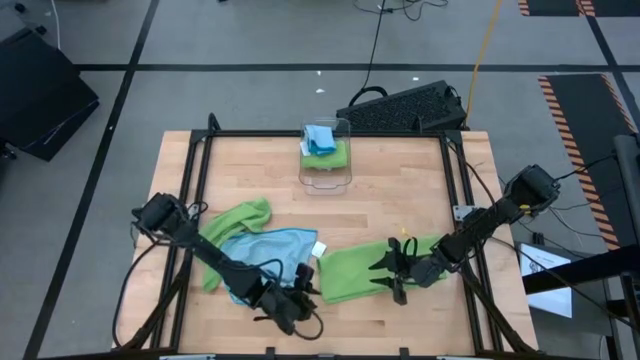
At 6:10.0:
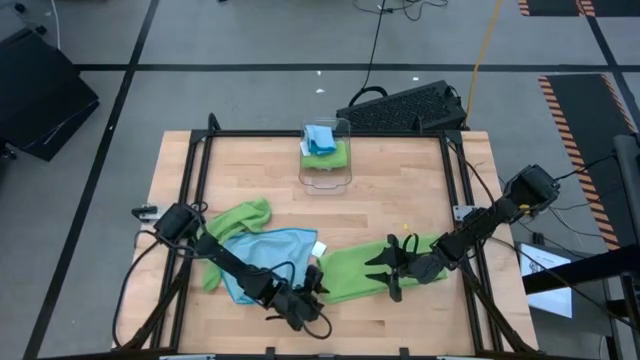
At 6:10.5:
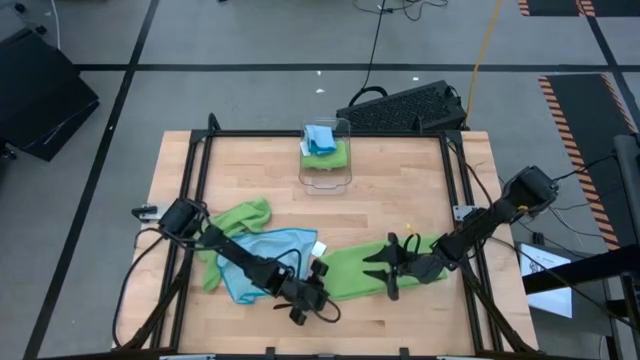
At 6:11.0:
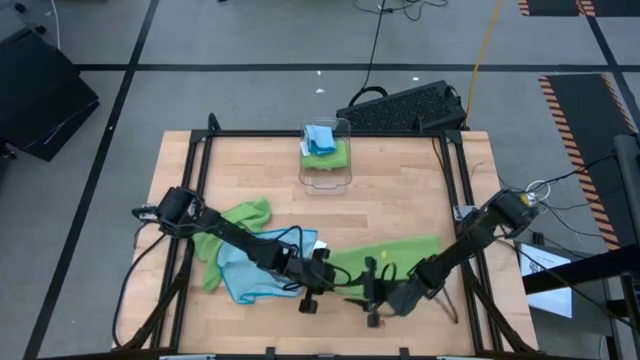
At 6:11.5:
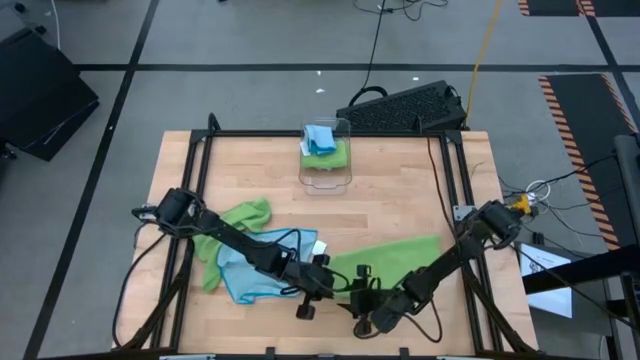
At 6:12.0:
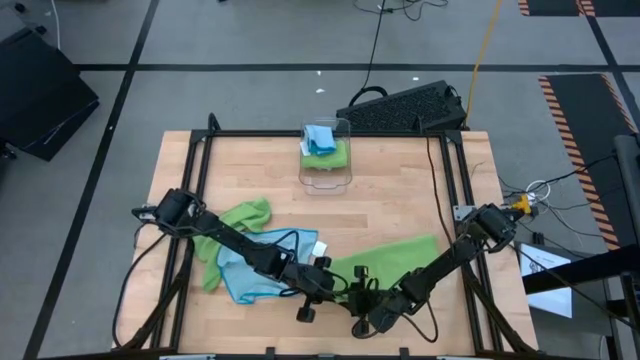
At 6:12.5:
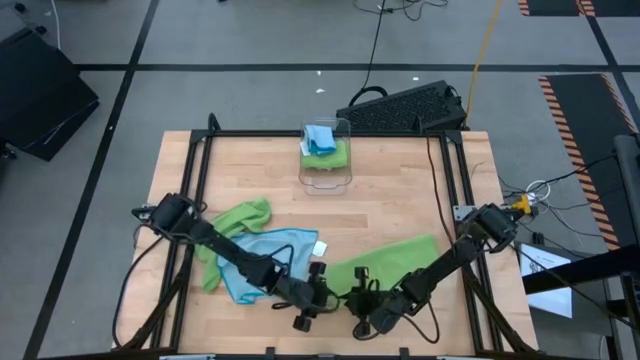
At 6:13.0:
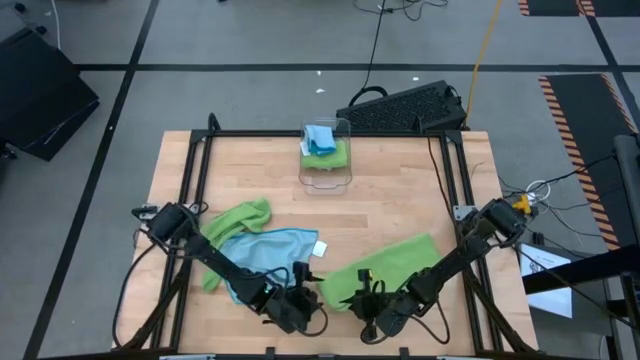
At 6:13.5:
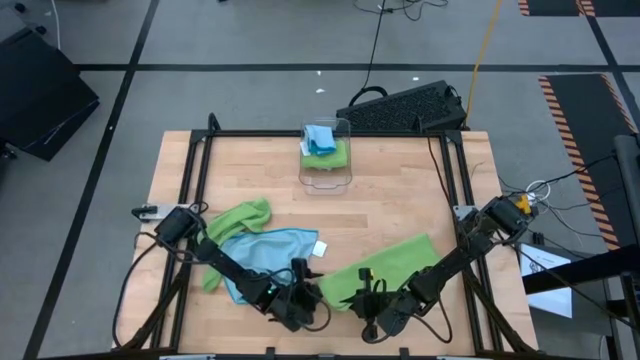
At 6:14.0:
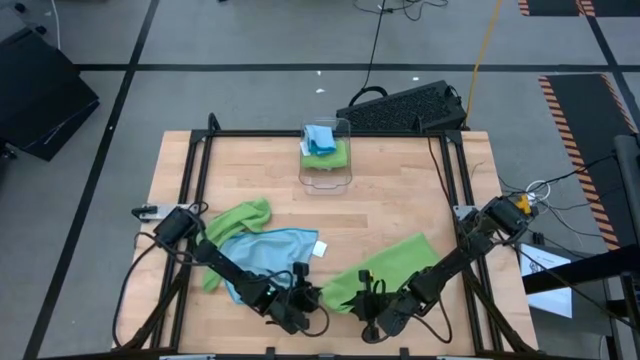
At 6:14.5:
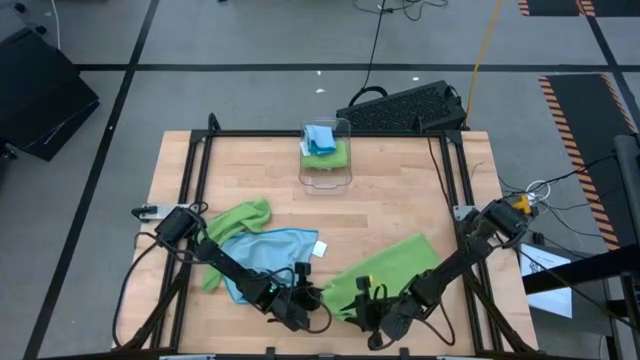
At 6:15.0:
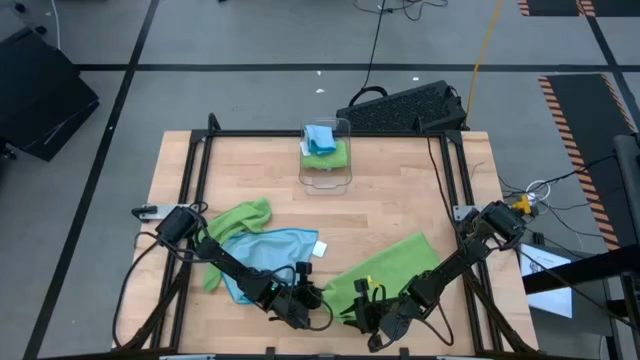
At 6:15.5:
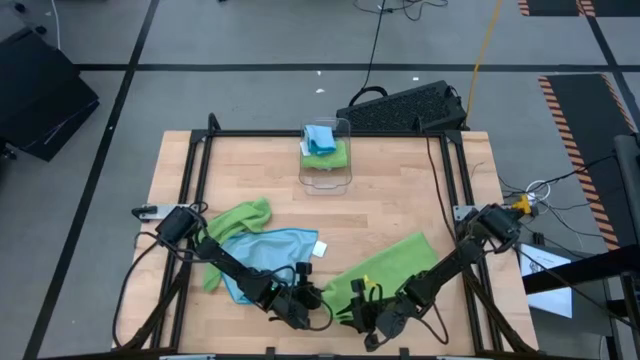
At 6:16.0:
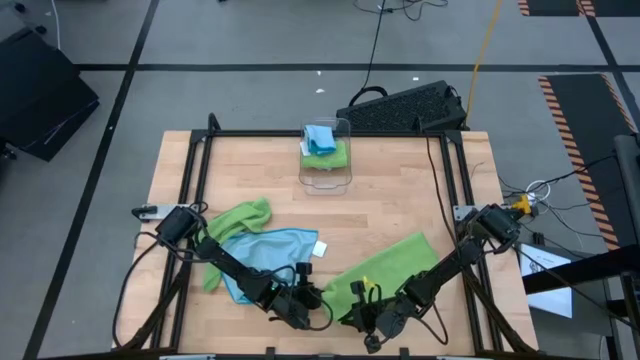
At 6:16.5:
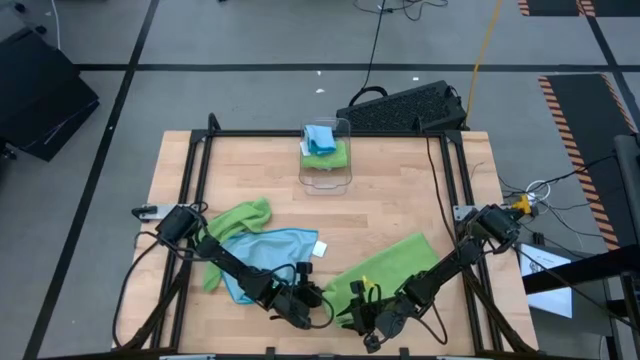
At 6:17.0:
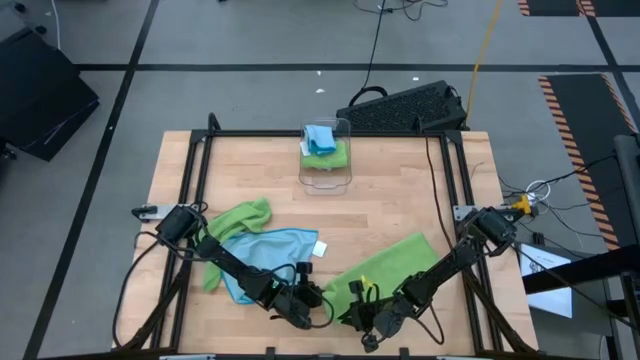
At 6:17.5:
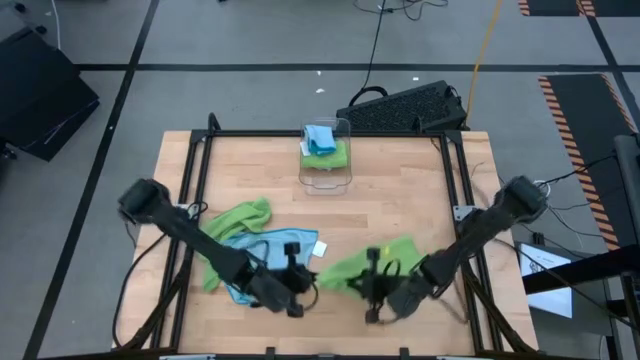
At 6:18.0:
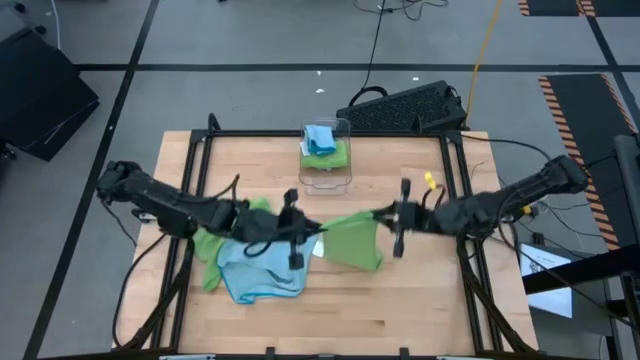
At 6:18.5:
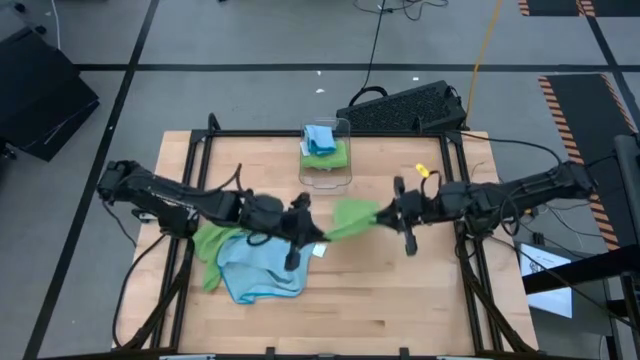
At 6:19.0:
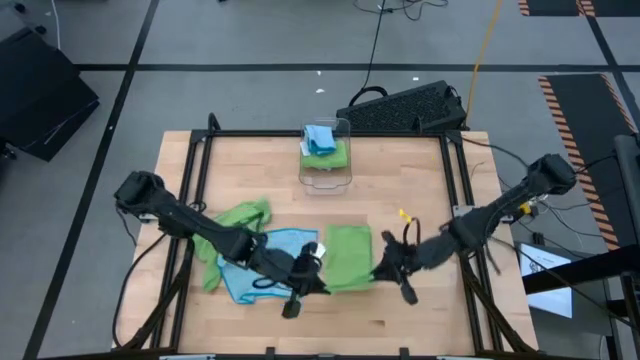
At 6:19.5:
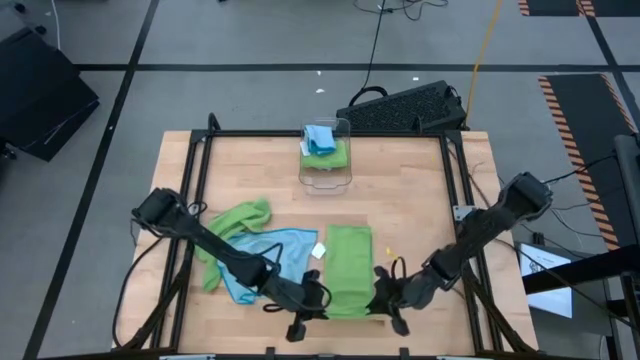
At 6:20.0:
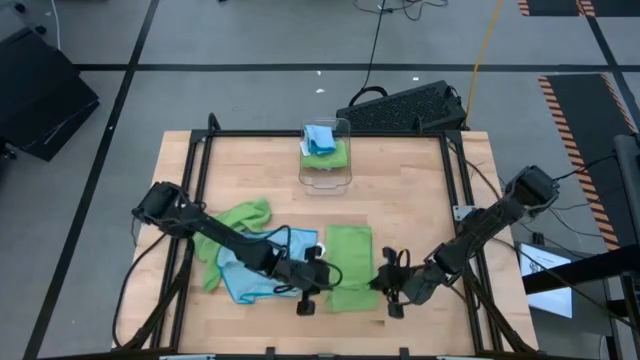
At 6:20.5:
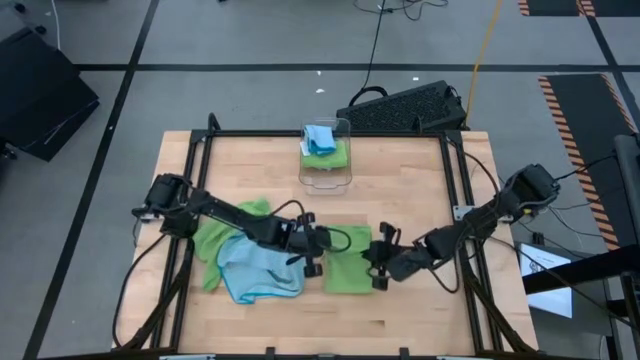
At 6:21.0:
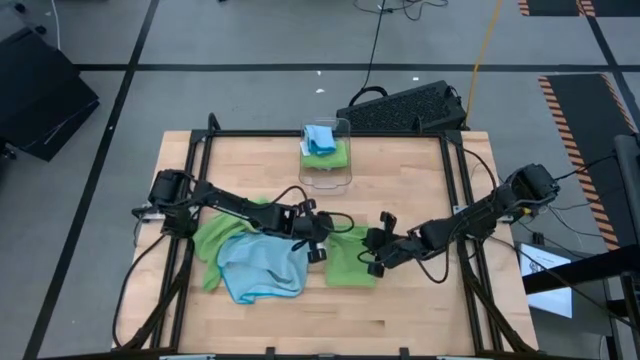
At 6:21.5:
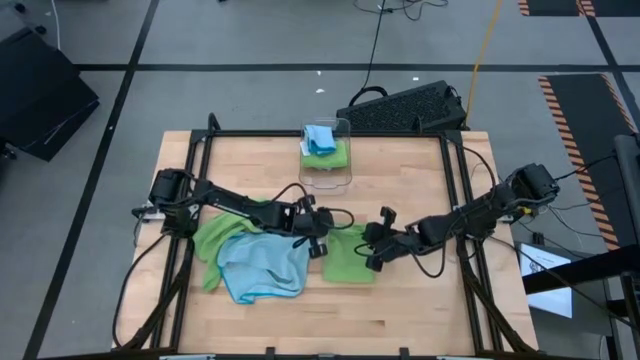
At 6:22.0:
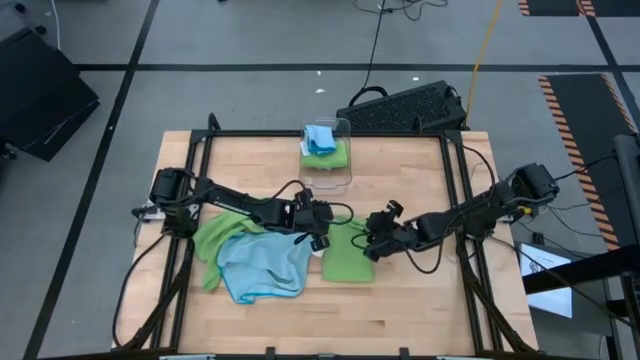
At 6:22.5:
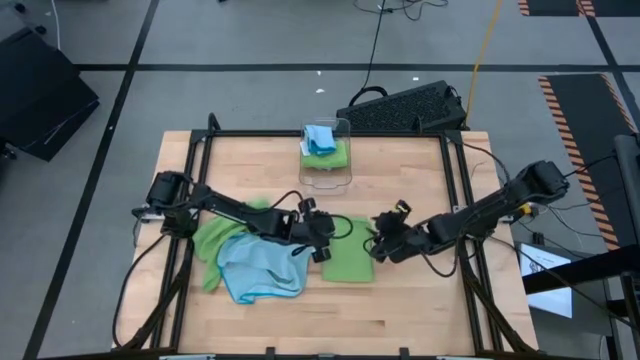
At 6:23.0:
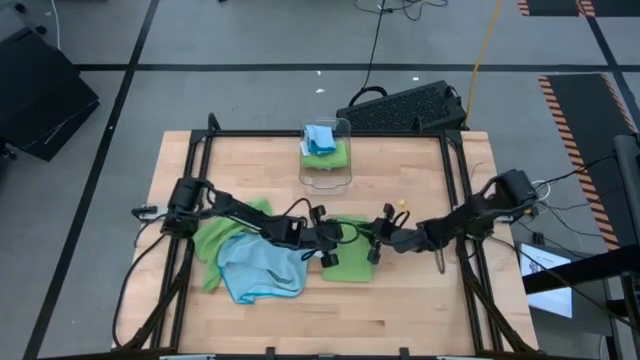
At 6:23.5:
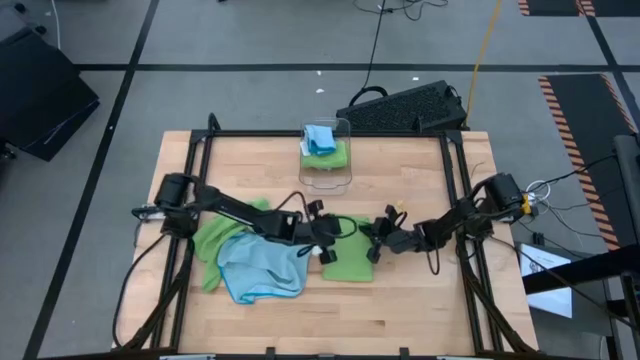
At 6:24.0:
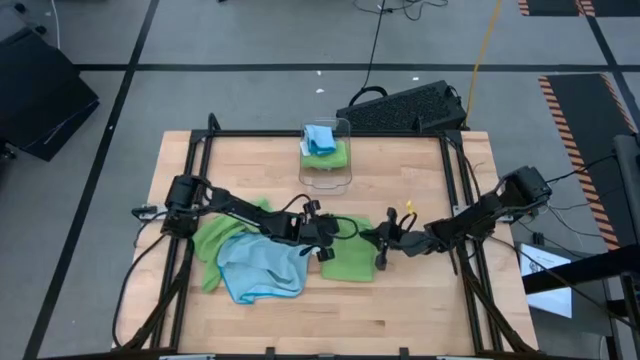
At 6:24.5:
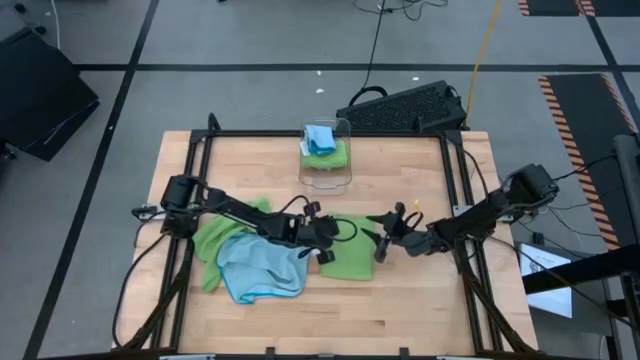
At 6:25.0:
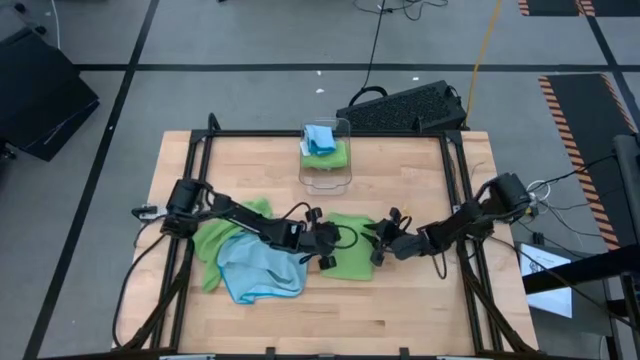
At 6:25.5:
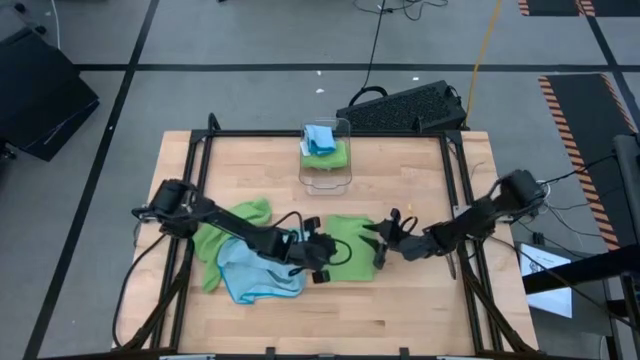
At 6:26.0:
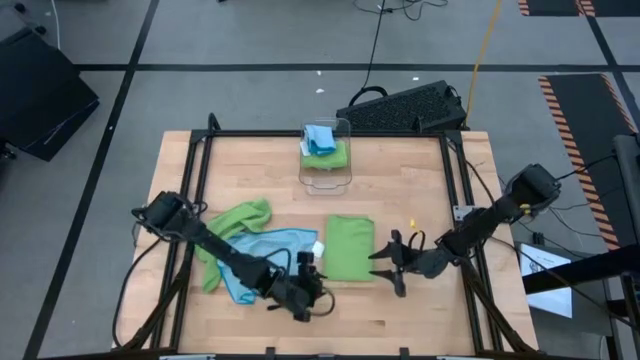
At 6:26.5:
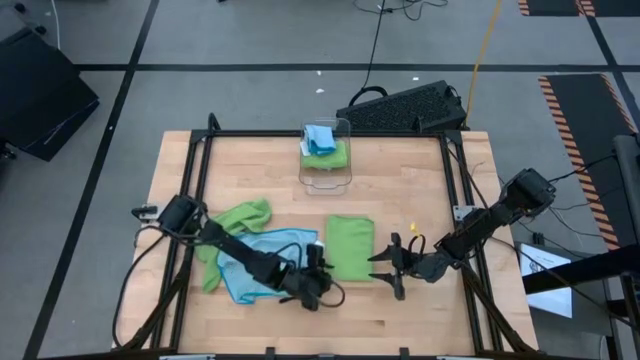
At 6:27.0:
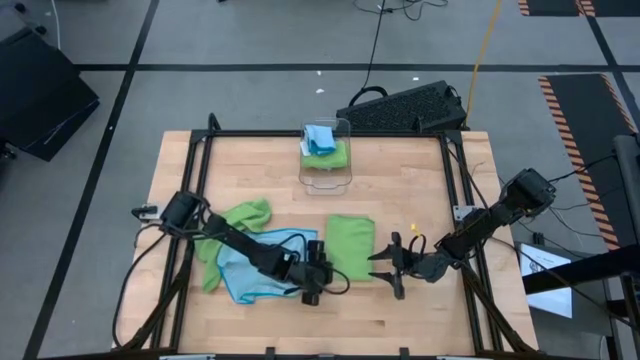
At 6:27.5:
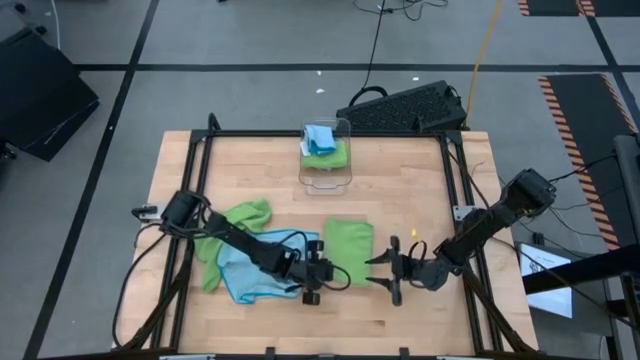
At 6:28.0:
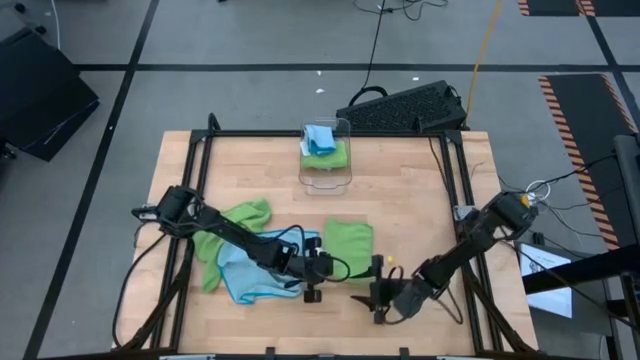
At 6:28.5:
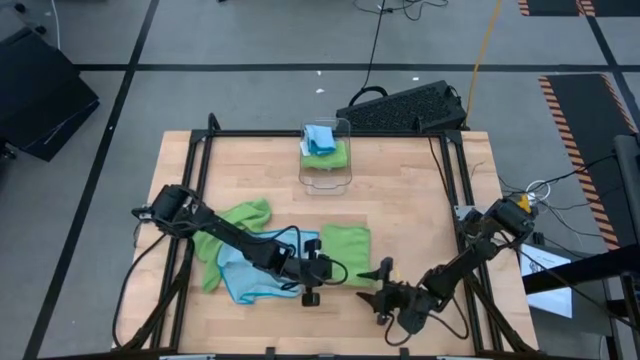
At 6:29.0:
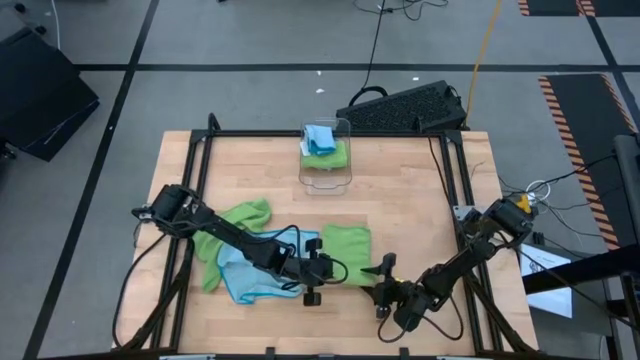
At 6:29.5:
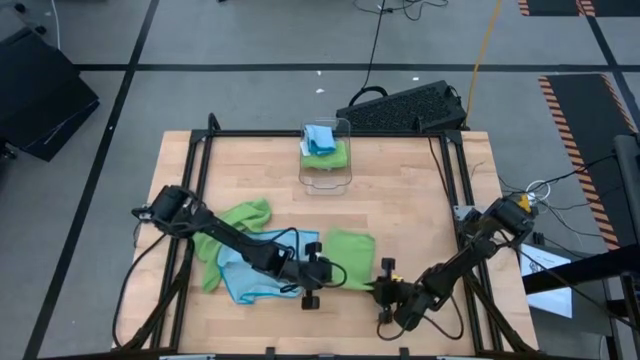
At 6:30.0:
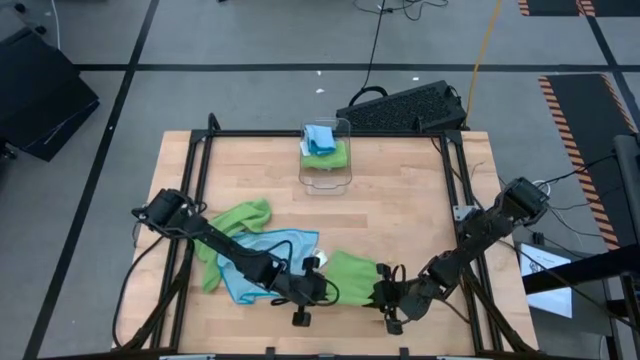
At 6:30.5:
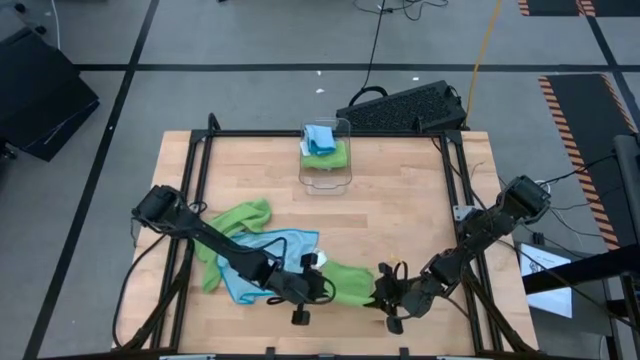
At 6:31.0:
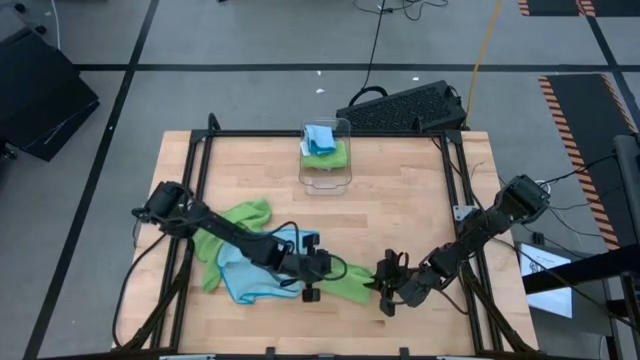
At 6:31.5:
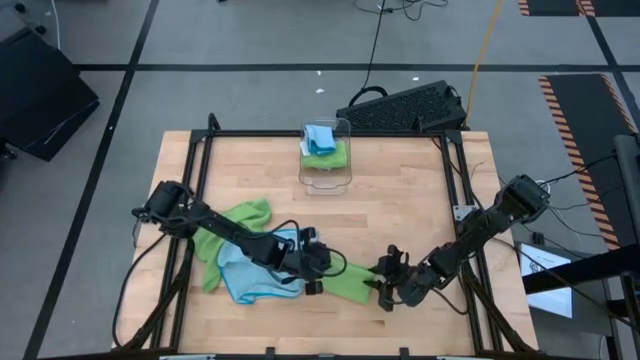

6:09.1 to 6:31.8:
Task: Fold microfiber towels
Fold the right green towel
